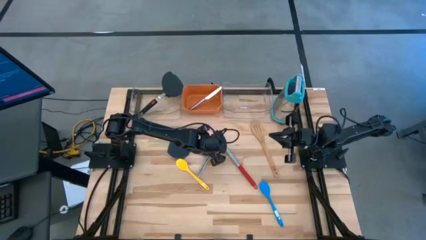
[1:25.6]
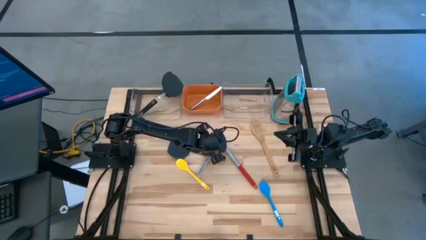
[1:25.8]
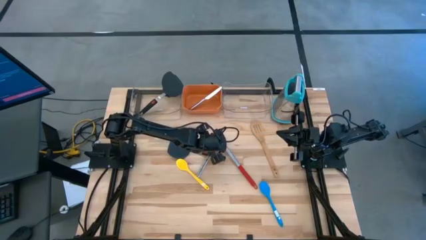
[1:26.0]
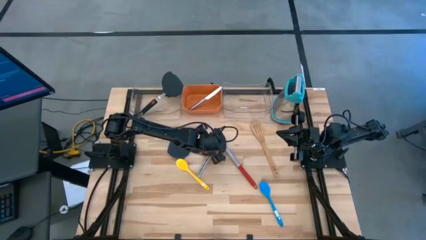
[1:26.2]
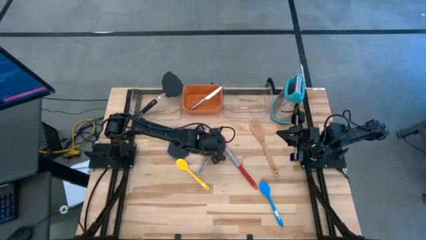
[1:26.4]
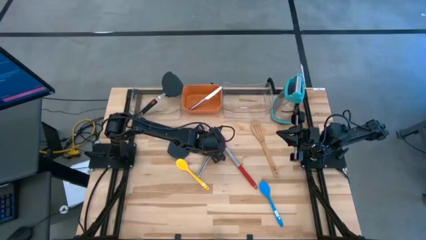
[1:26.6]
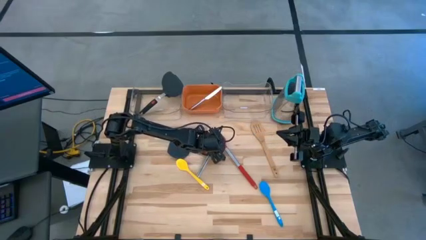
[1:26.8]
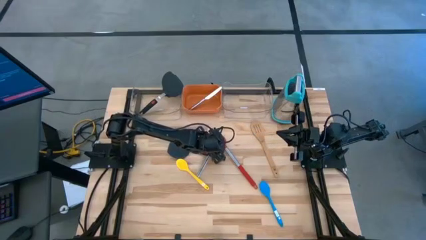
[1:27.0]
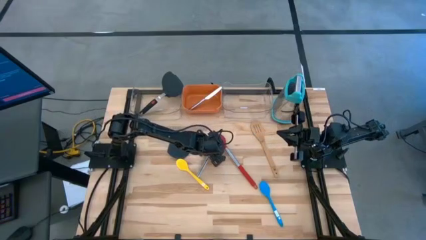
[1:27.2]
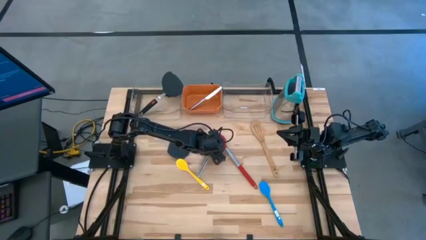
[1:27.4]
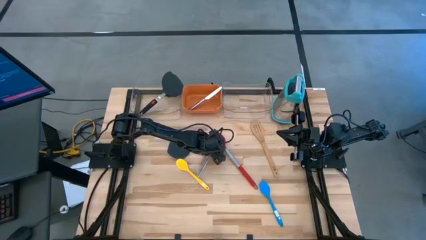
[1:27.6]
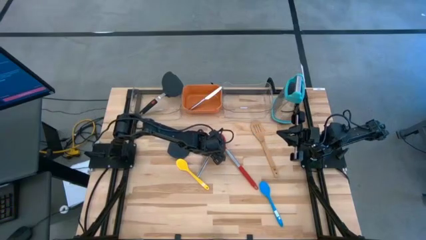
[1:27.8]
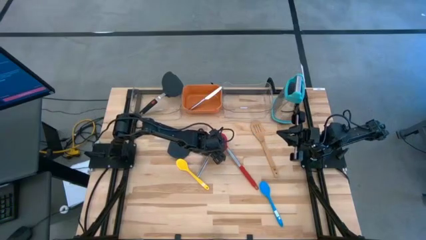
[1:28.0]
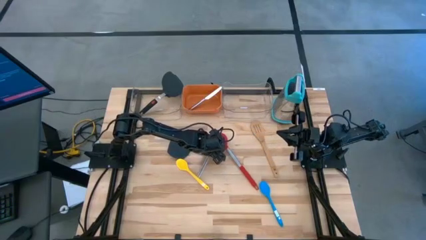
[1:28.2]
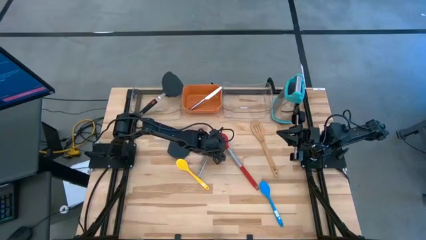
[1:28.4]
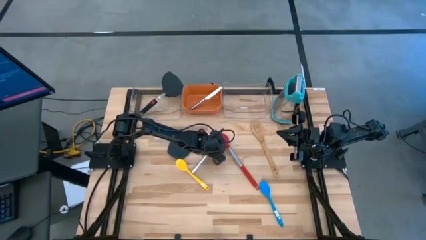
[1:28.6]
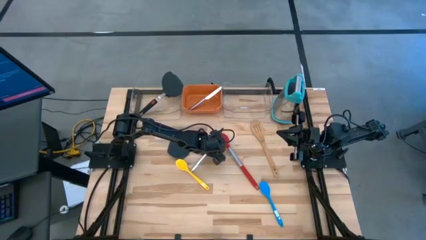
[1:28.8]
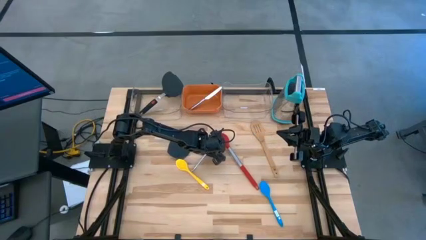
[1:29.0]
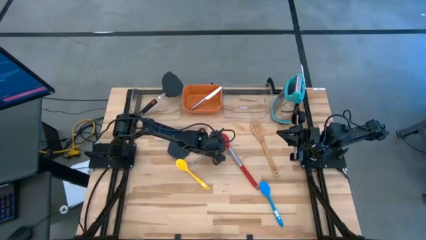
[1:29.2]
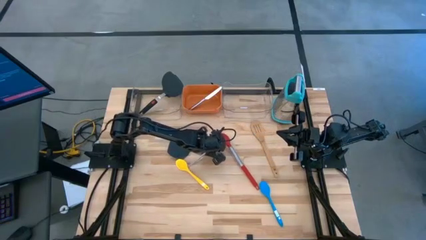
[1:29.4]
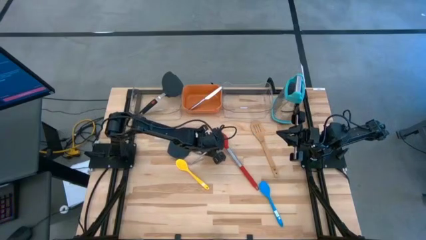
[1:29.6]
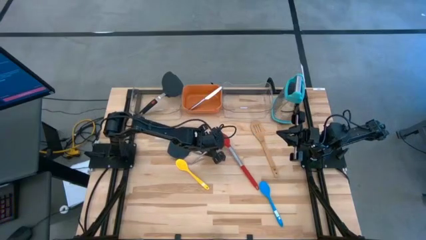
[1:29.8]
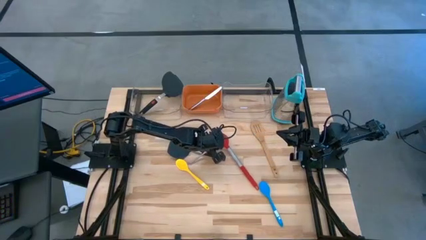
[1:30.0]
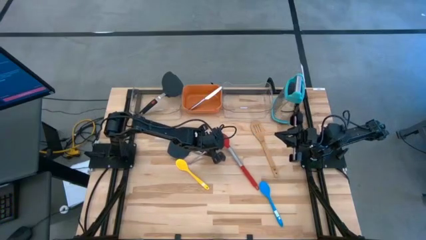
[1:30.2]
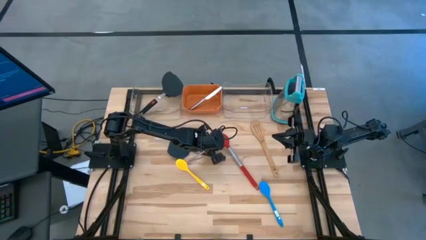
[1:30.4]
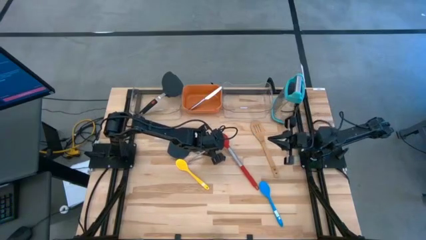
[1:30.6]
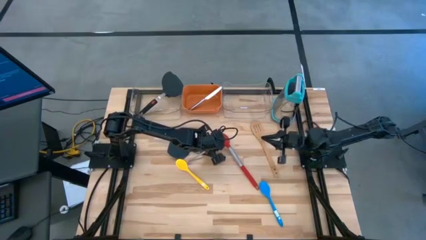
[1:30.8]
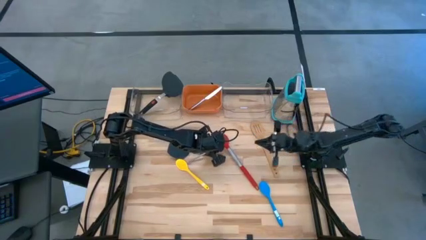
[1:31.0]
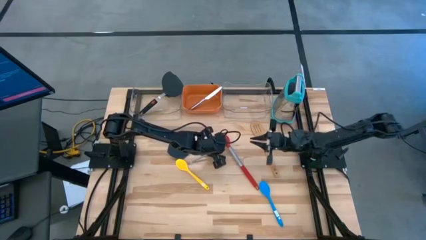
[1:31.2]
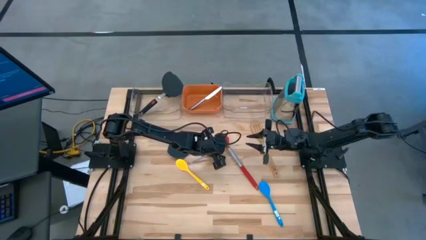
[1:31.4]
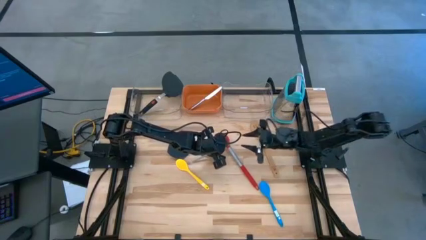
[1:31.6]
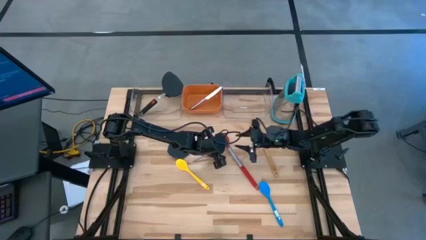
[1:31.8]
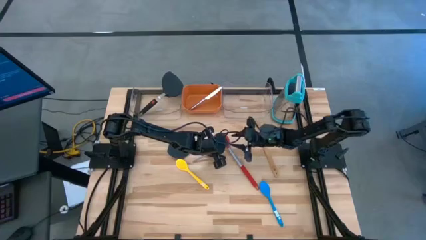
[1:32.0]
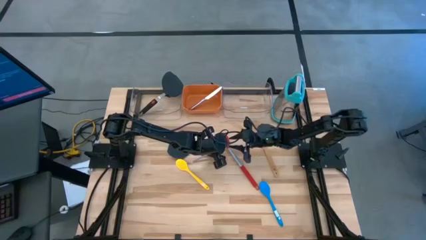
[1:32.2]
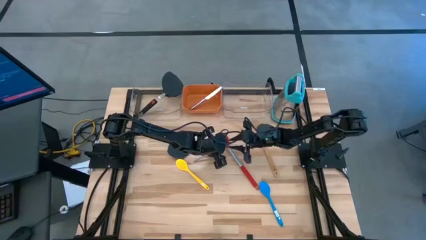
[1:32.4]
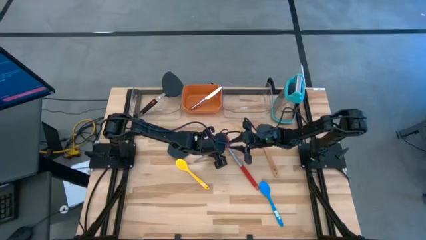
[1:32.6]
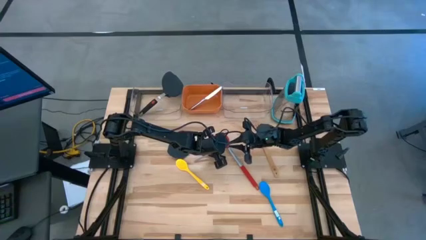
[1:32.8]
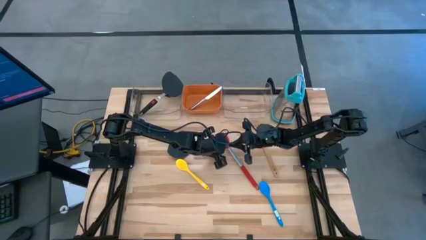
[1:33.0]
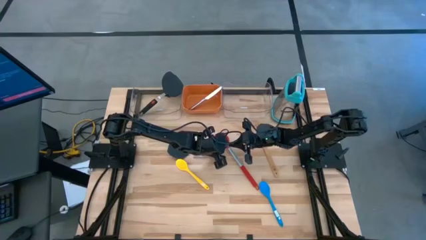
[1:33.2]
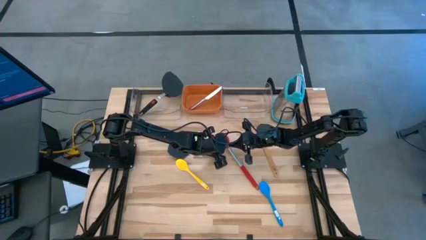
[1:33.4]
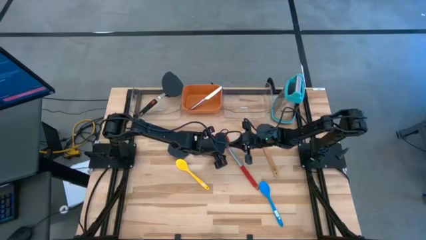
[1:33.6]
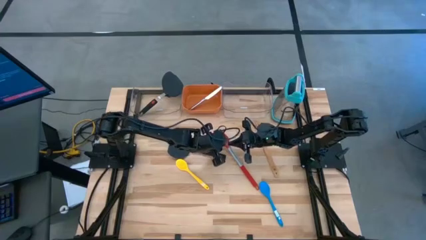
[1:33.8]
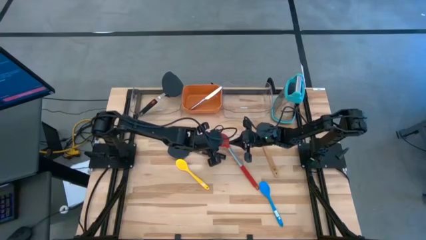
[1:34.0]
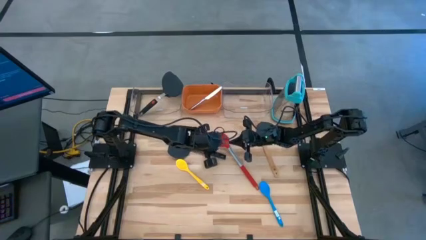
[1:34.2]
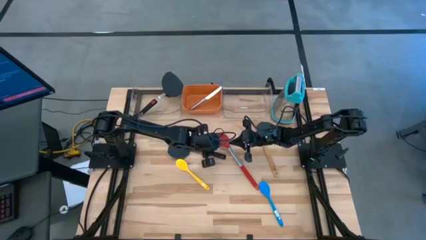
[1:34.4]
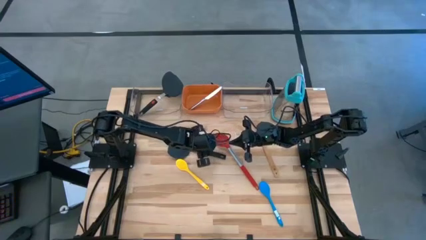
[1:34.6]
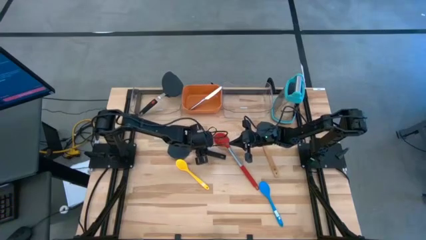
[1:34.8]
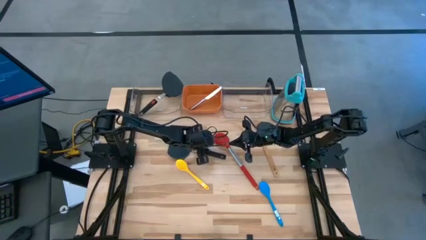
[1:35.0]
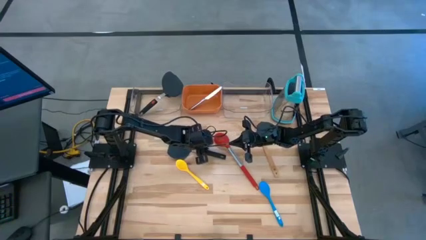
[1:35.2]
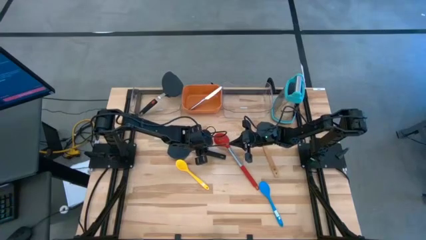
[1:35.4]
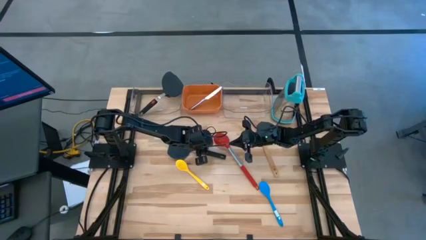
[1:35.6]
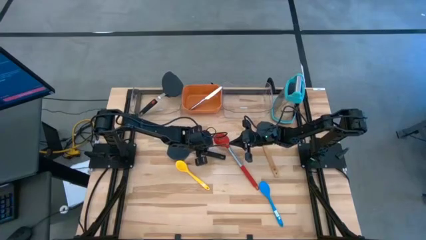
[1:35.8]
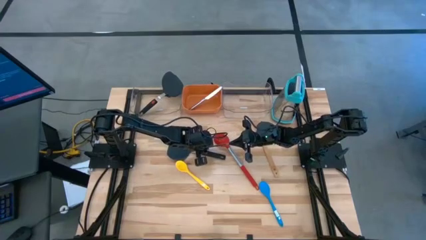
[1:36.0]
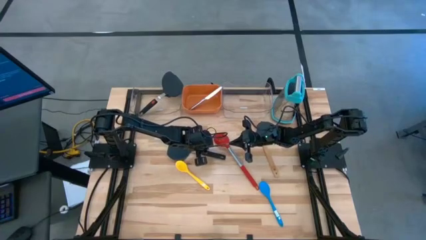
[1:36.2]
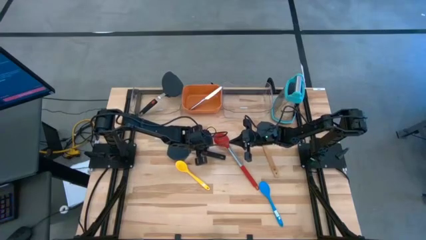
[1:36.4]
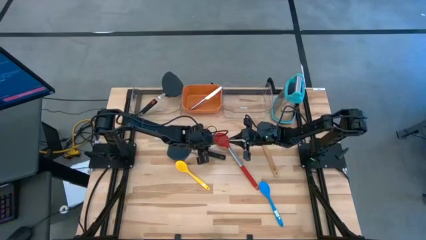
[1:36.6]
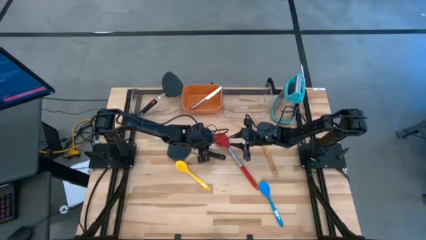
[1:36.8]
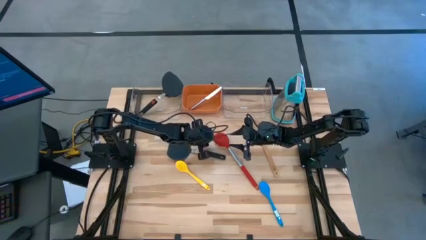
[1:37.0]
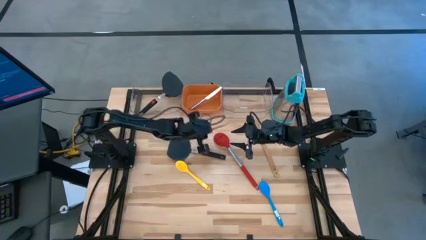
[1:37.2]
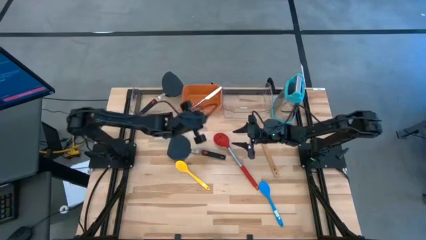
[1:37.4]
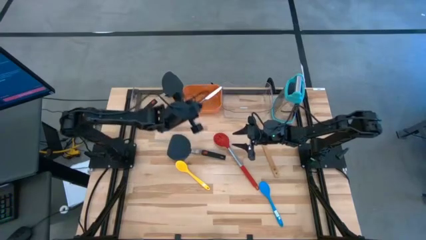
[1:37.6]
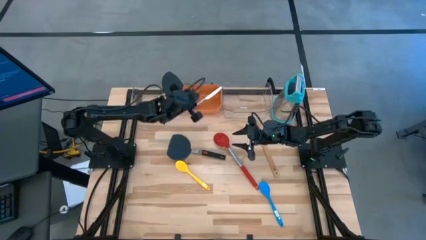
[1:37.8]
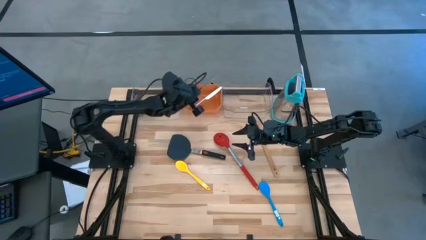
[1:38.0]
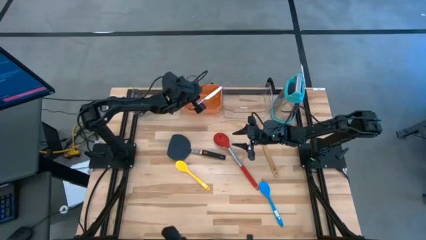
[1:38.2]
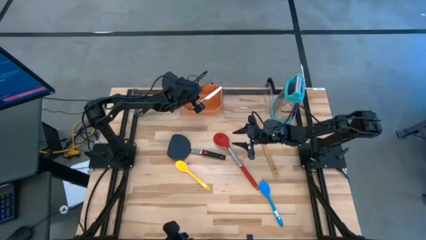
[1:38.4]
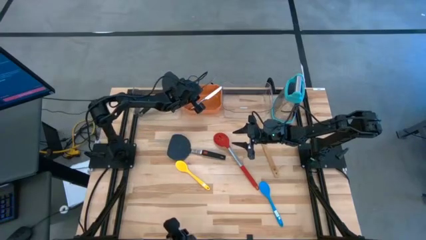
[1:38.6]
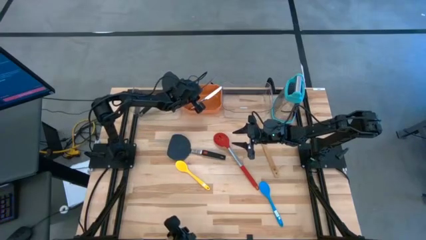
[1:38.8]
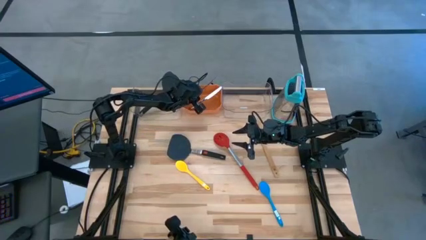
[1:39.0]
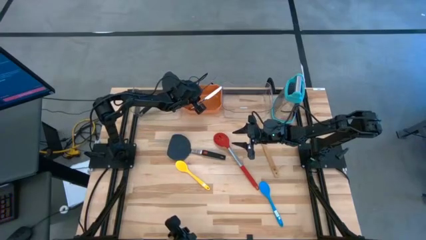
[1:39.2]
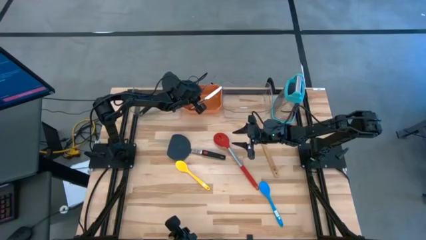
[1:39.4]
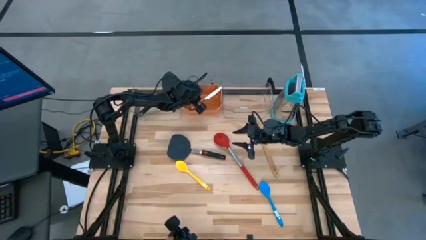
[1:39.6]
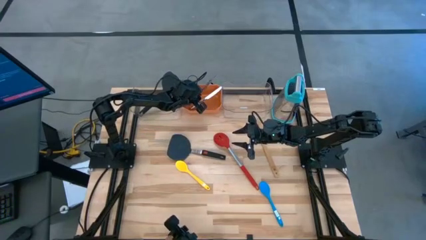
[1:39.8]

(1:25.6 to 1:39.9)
Task: Pick & Place Kitchen Items
Put the silver table knife into the orange bin
